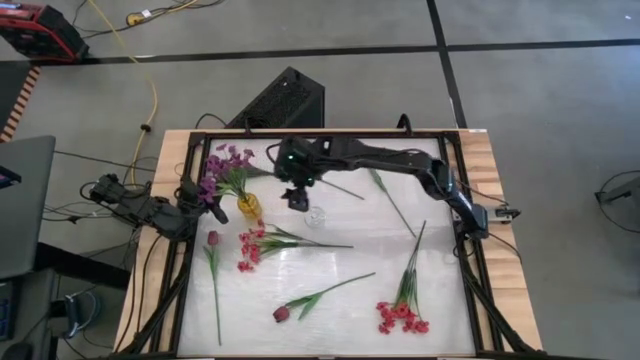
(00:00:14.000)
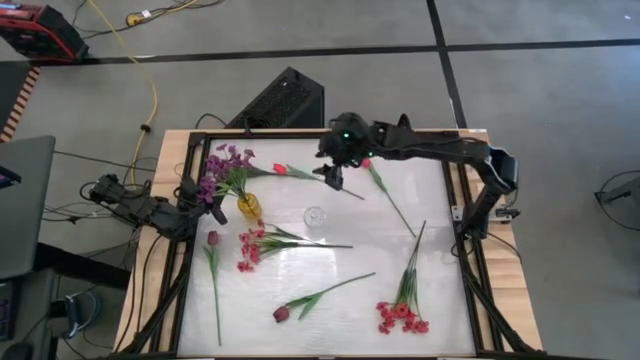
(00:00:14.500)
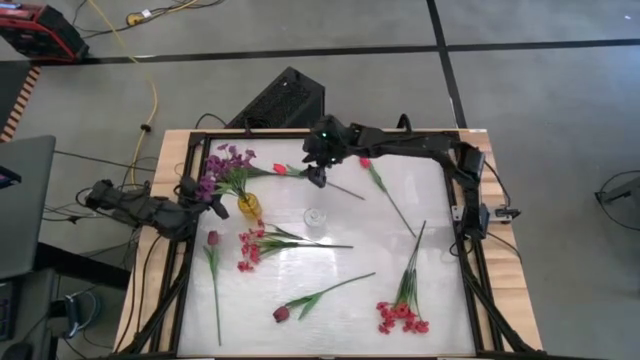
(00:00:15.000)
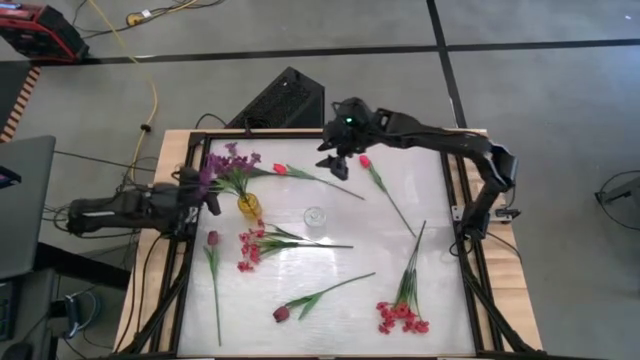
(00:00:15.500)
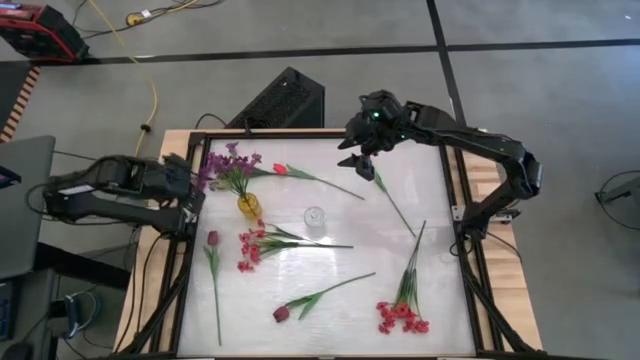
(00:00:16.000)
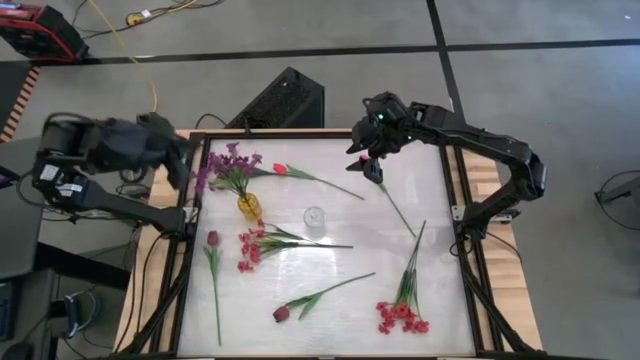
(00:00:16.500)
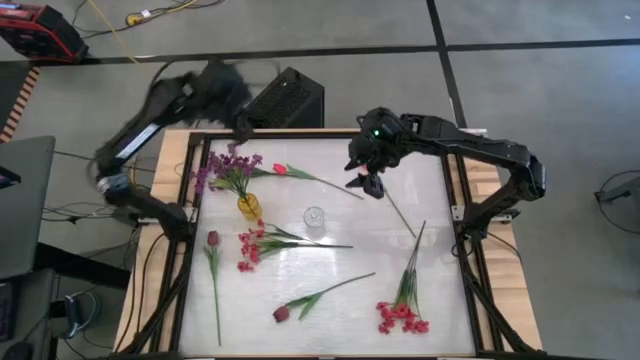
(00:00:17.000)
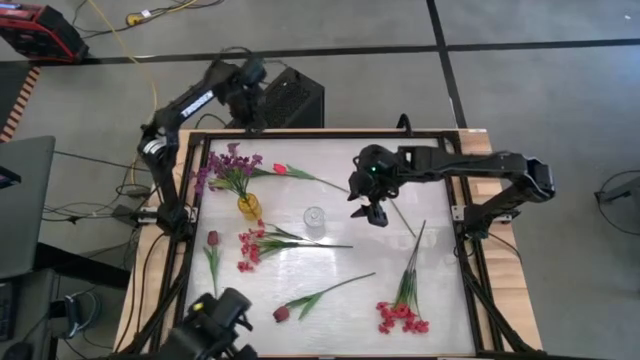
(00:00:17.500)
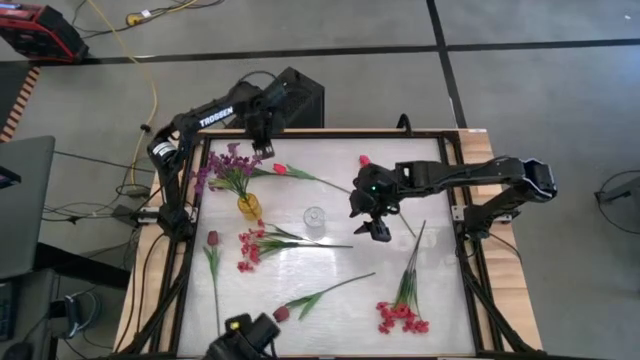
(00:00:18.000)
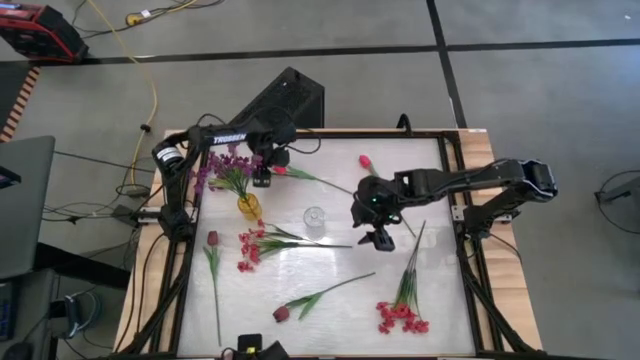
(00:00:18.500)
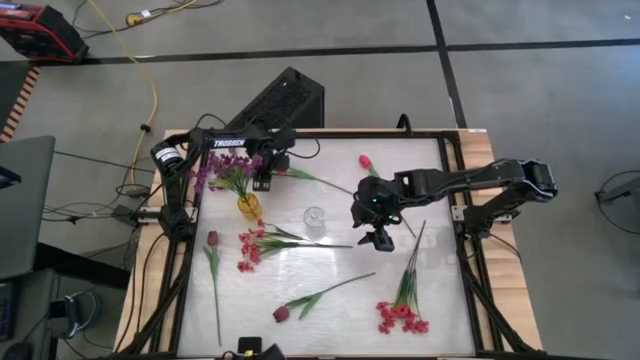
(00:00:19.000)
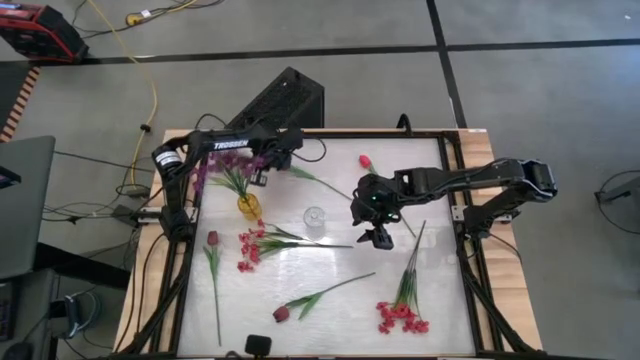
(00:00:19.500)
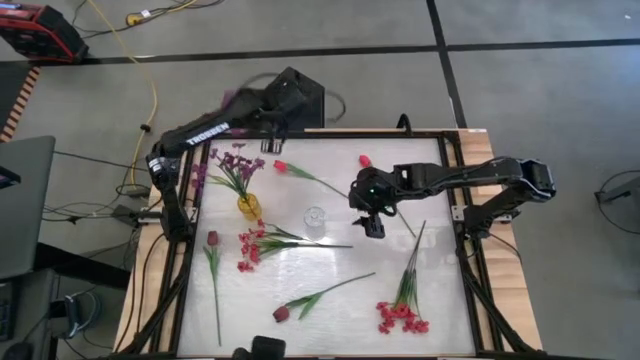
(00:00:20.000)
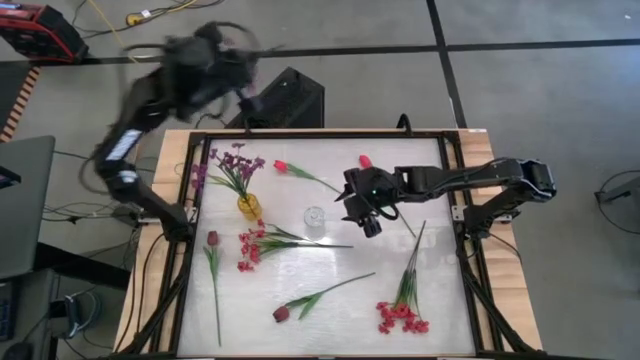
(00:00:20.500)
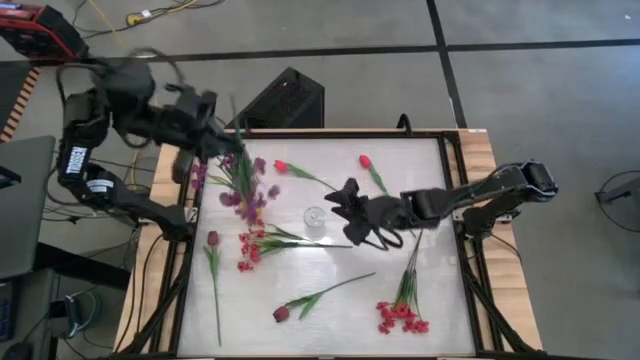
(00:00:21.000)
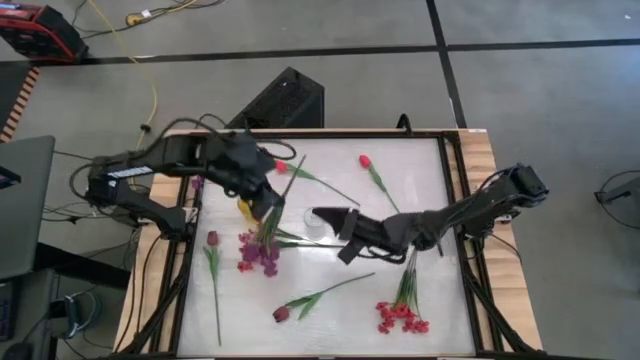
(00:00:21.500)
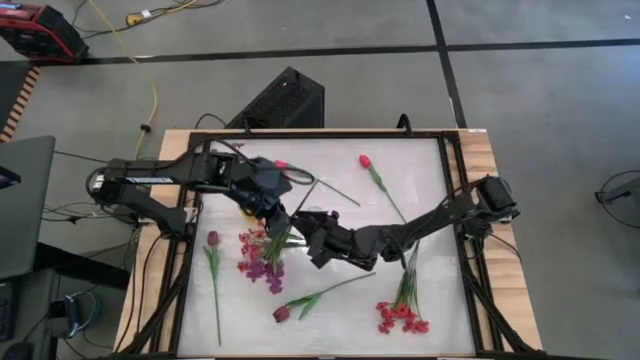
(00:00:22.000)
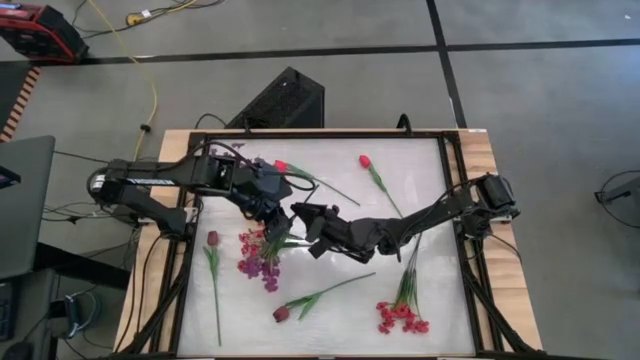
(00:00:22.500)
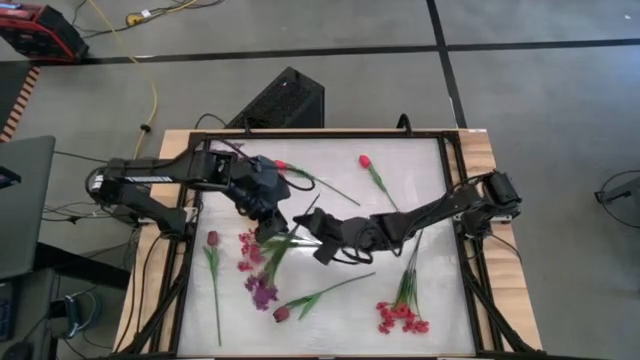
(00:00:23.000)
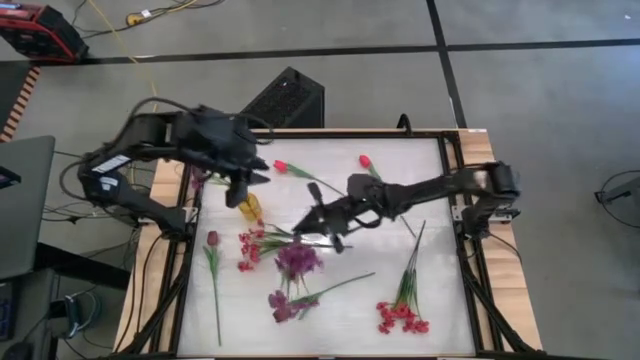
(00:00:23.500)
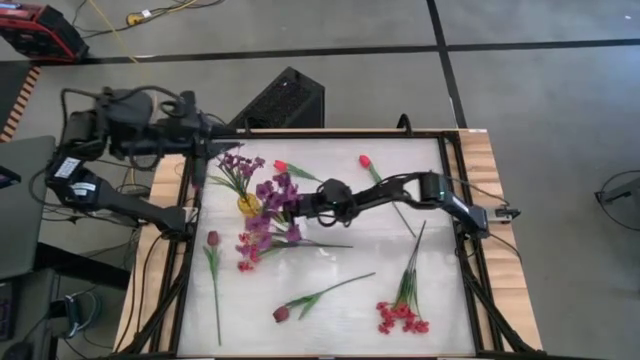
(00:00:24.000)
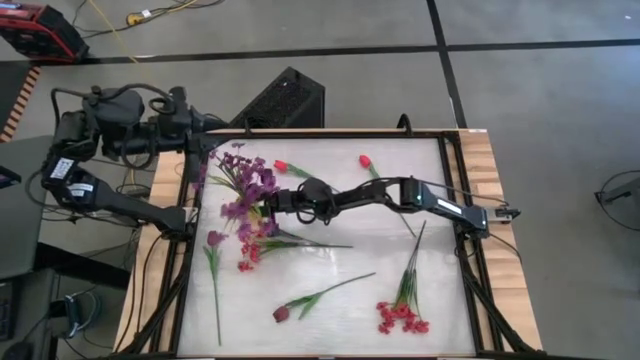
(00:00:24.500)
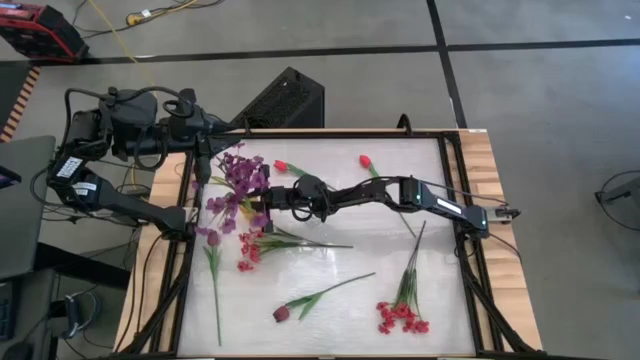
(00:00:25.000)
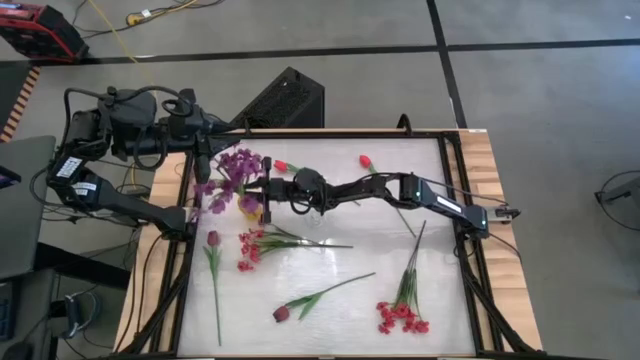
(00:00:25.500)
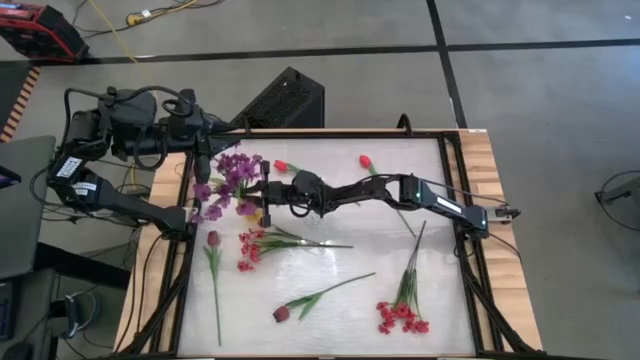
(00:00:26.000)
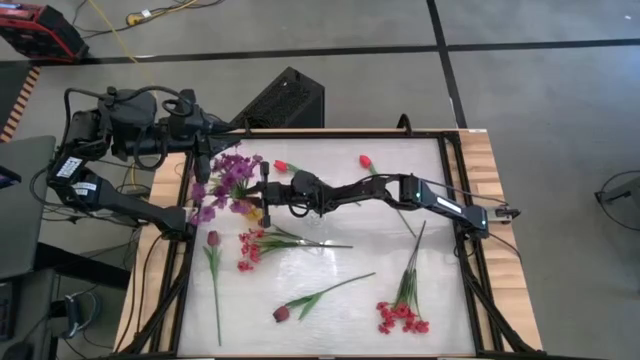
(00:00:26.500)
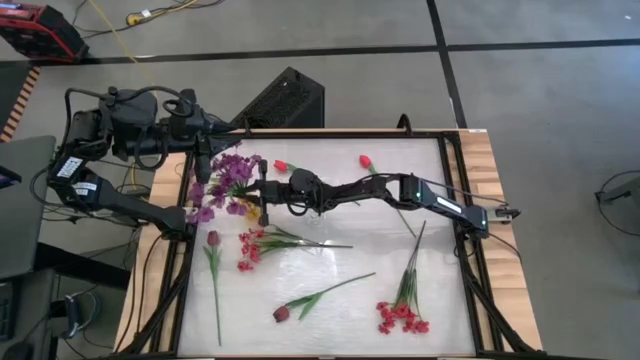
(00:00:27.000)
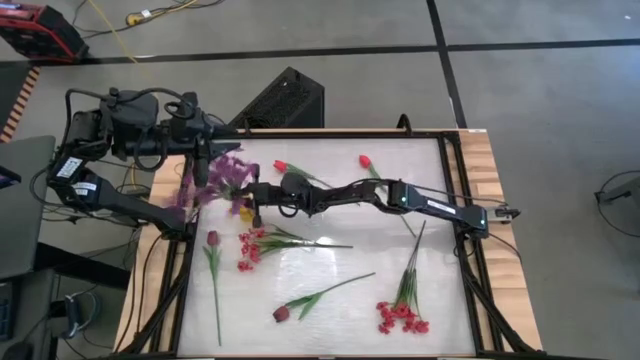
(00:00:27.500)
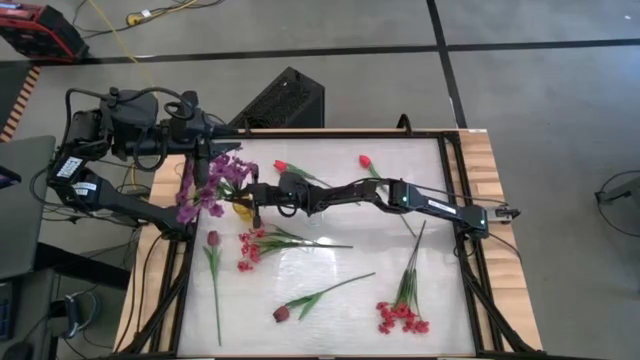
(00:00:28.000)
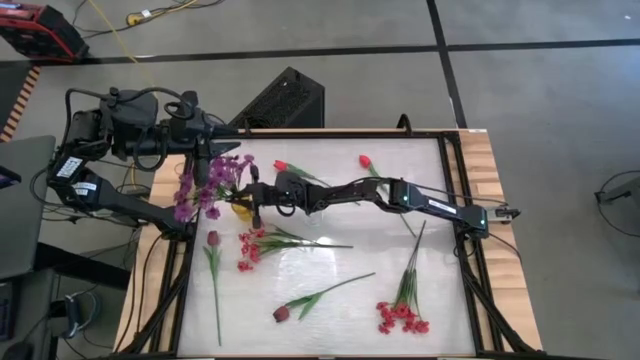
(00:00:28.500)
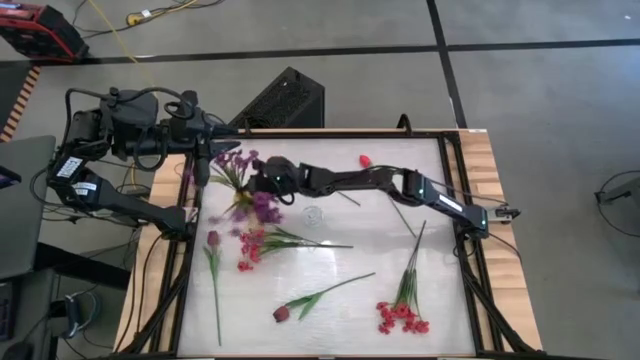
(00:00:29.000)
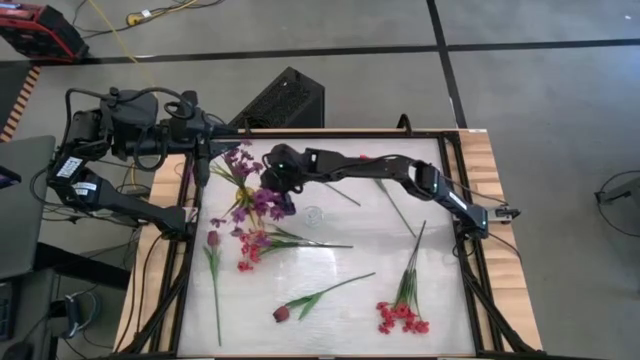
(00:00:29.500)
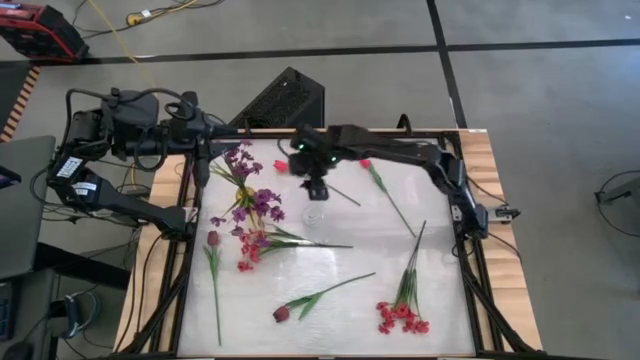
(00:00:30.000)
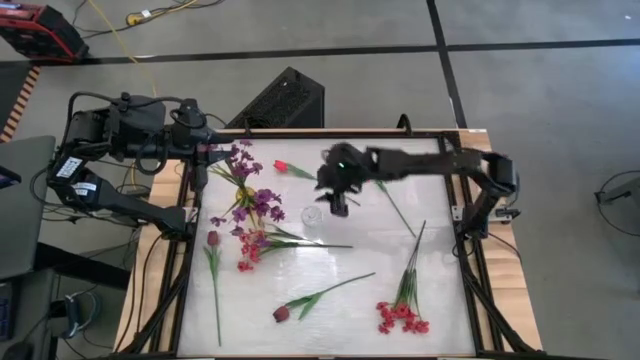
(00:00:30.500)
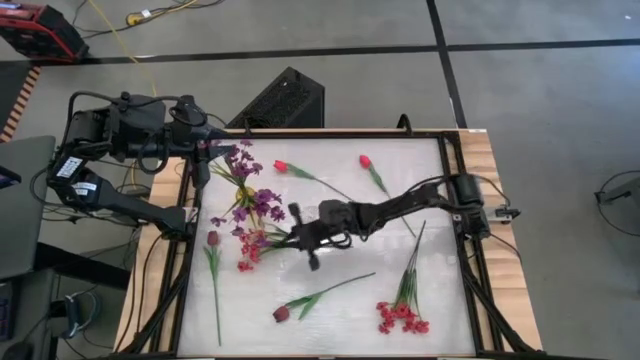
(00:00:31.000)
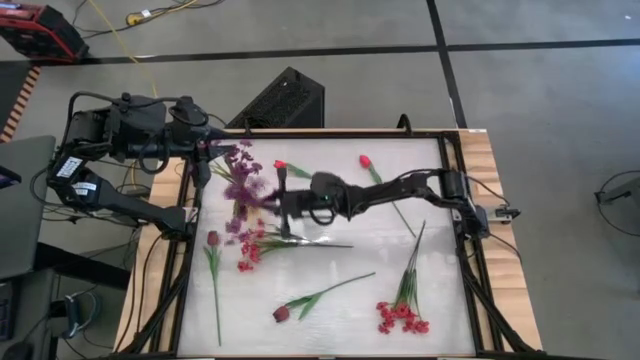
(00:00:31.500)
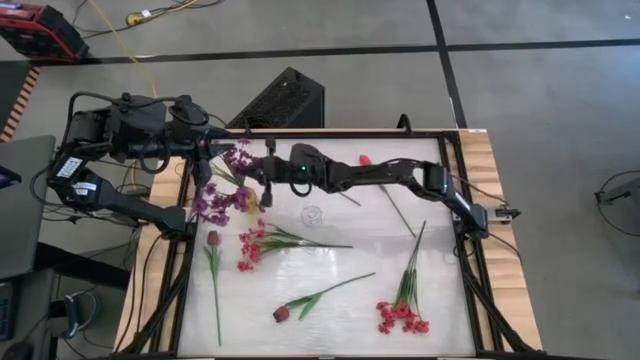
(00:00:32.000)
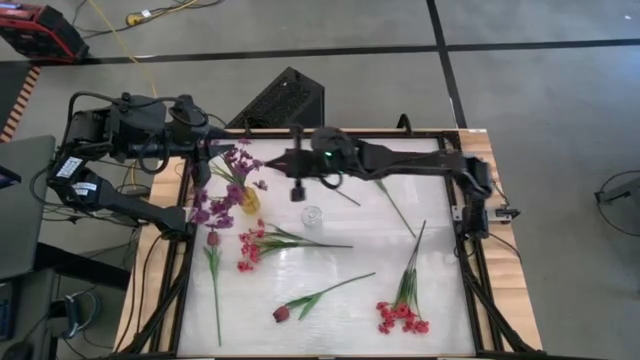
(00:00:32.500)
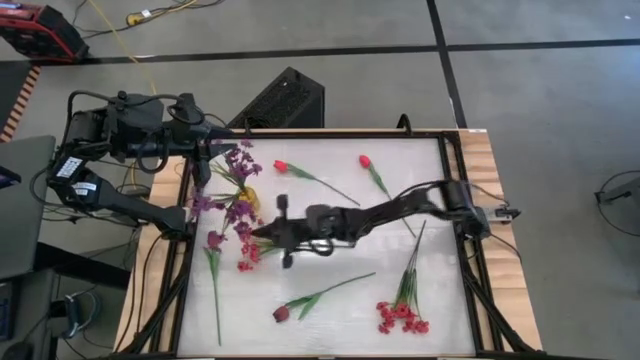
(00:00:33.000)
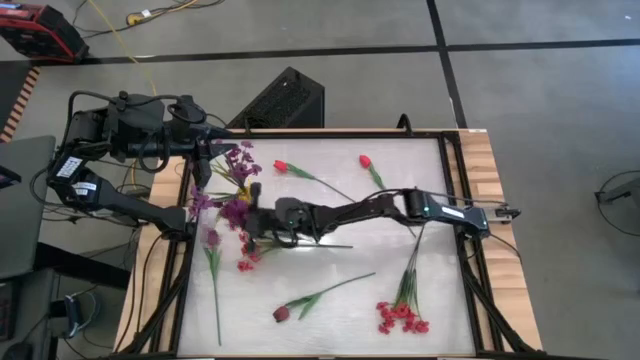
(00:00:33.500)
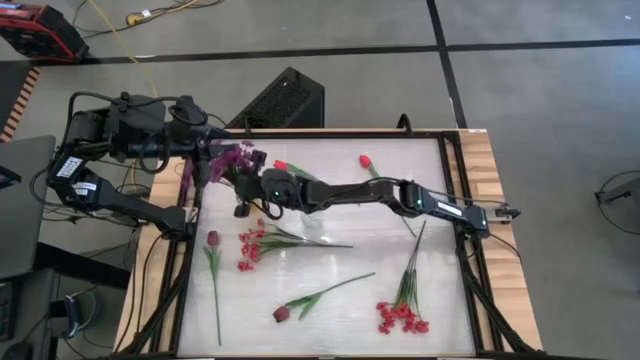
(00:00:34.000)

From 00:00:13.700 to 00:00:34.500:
Task: Sort flowers into vase by color
Put the violet flower into the yellow vase
